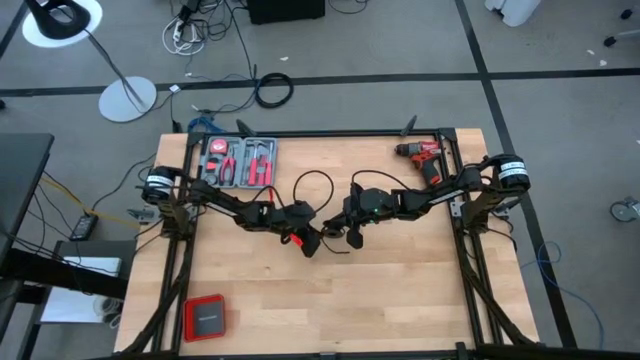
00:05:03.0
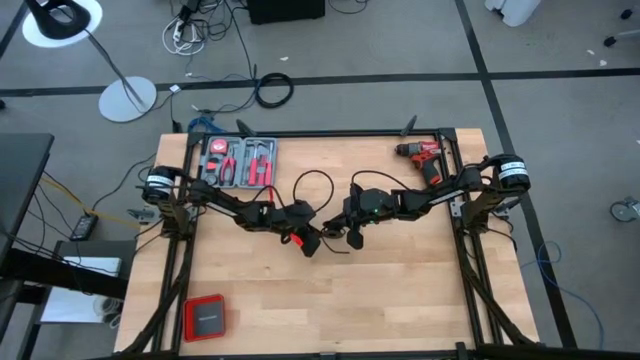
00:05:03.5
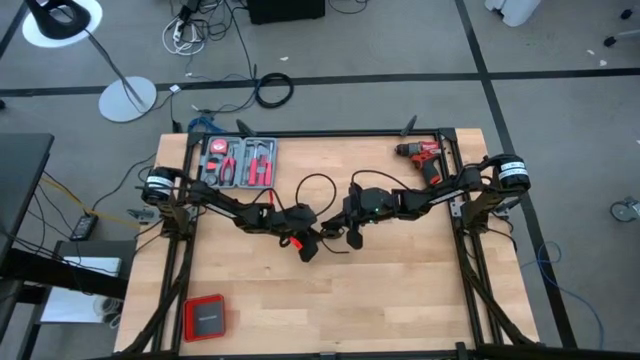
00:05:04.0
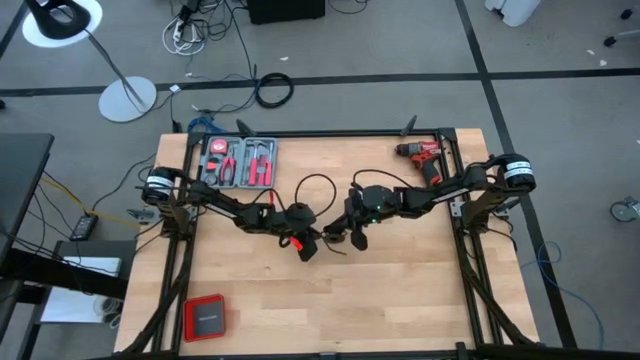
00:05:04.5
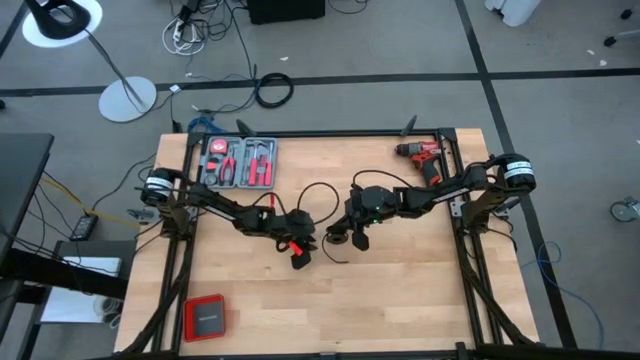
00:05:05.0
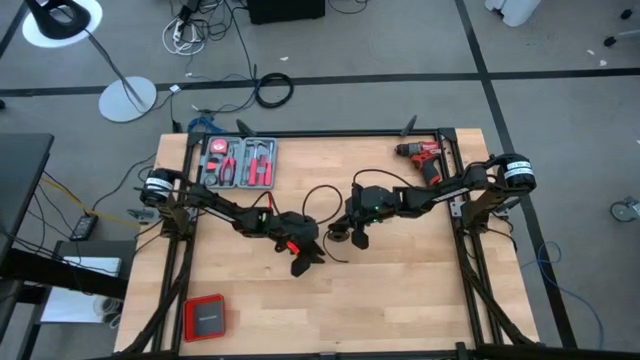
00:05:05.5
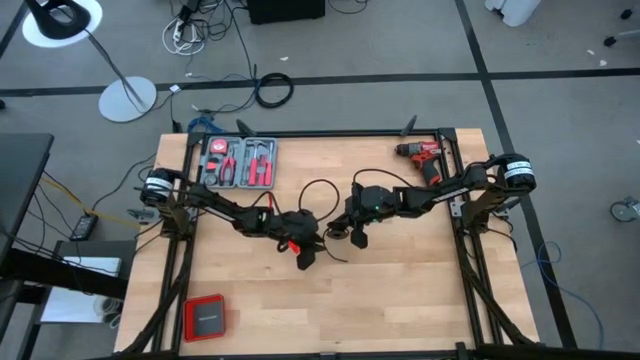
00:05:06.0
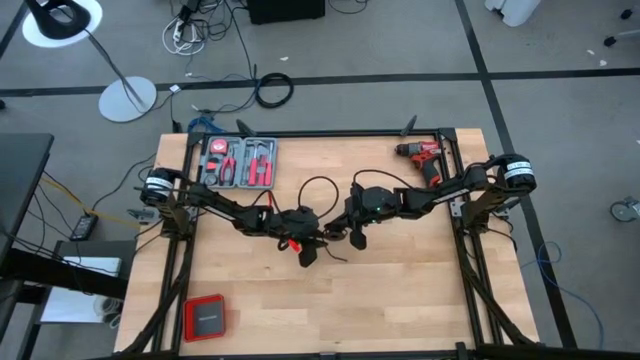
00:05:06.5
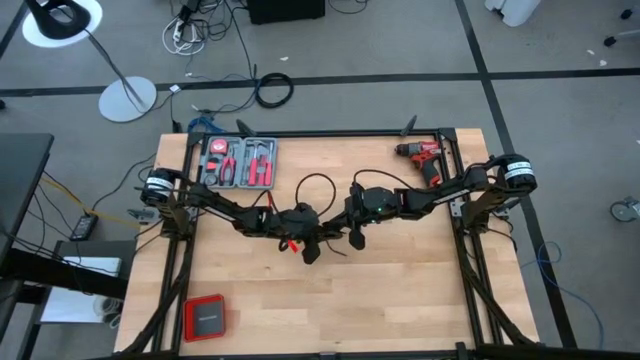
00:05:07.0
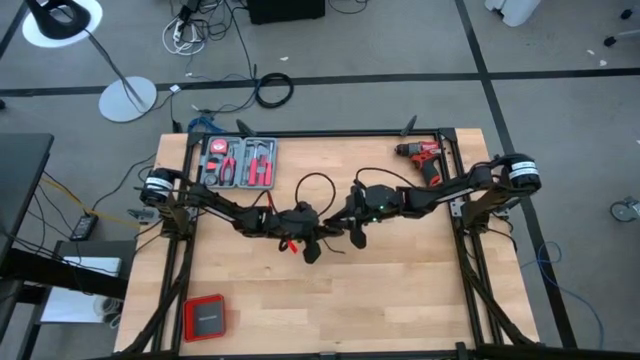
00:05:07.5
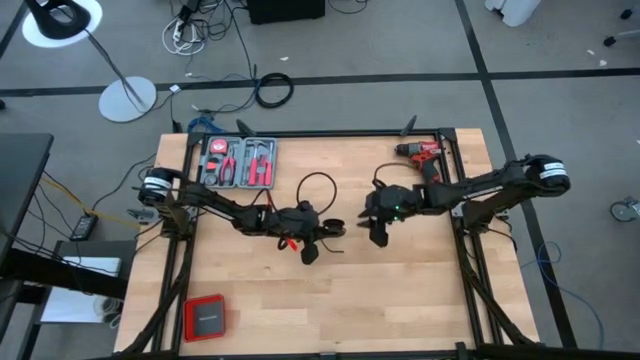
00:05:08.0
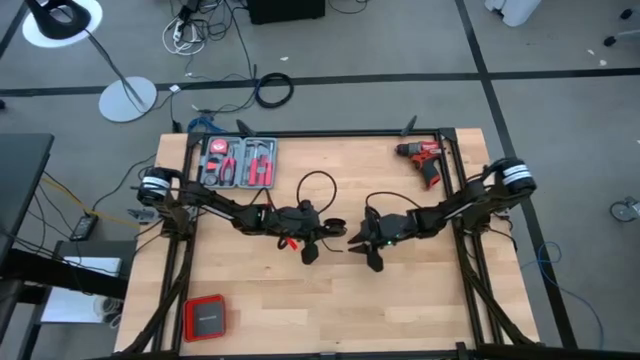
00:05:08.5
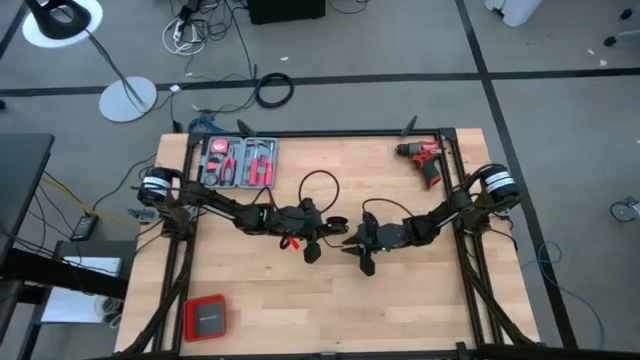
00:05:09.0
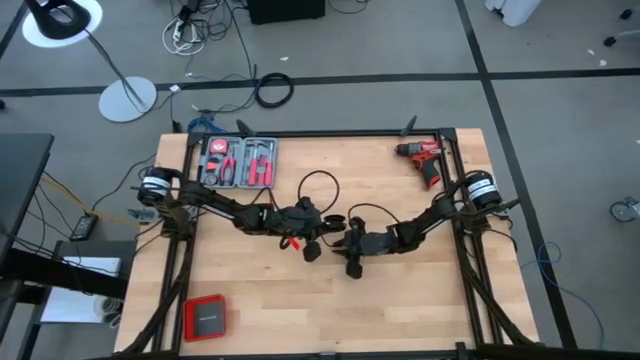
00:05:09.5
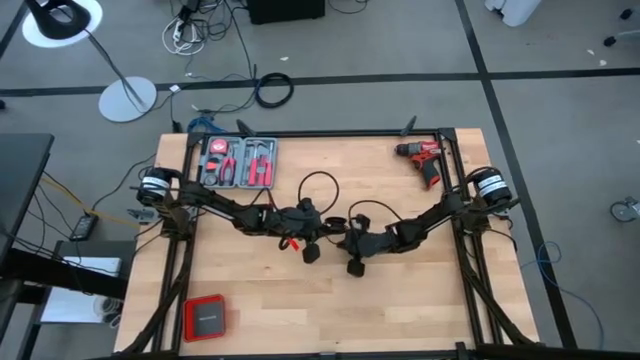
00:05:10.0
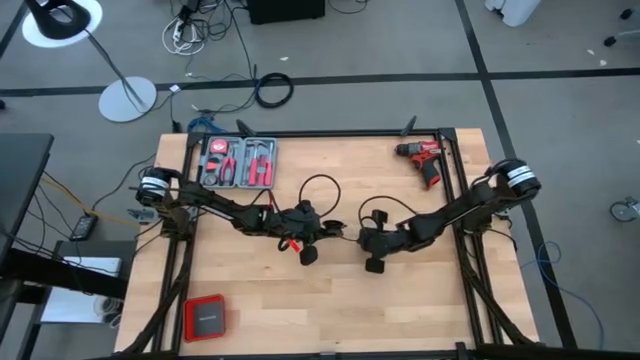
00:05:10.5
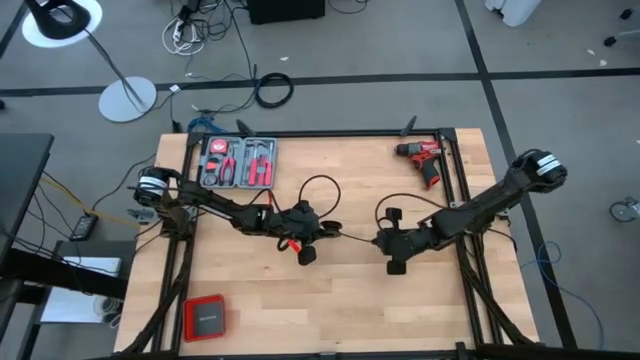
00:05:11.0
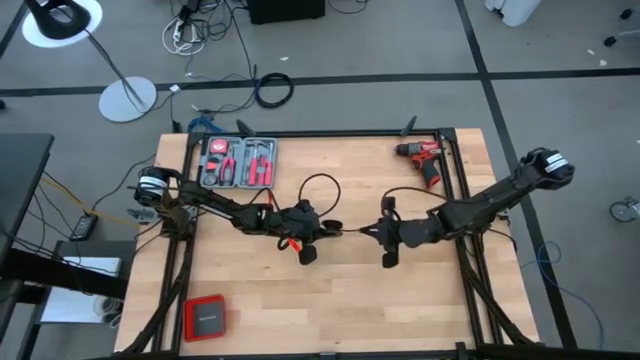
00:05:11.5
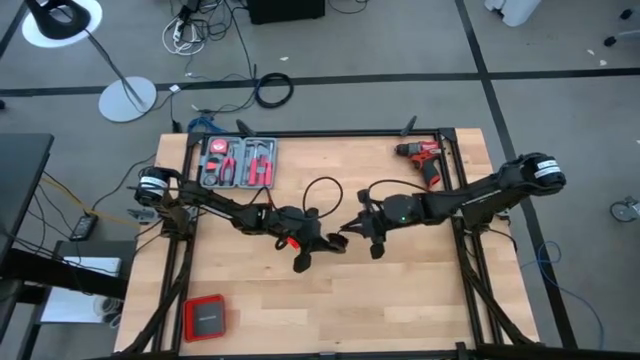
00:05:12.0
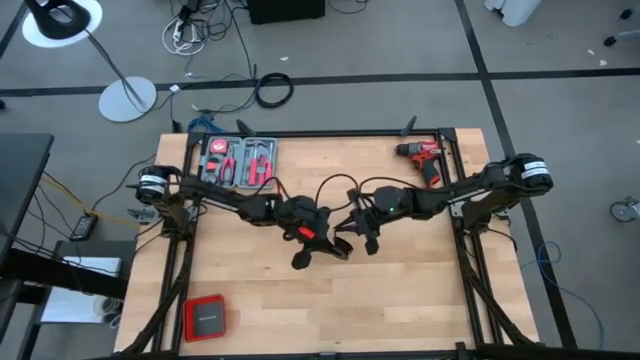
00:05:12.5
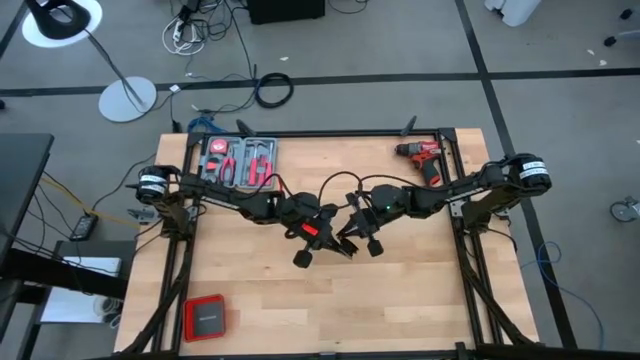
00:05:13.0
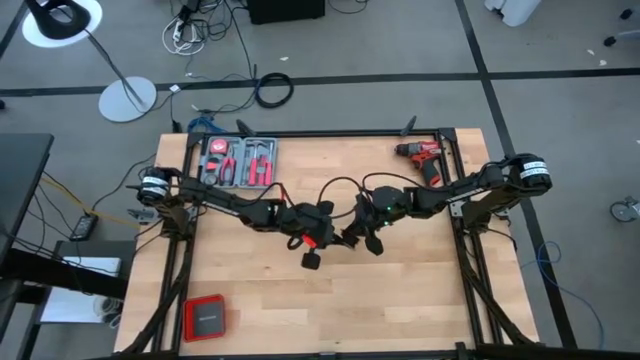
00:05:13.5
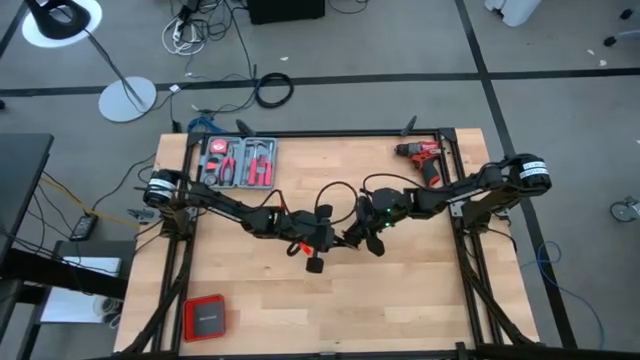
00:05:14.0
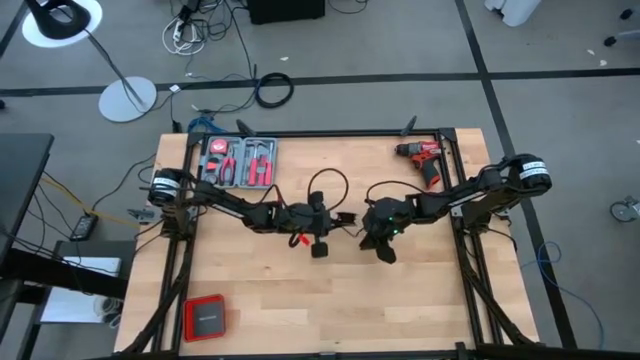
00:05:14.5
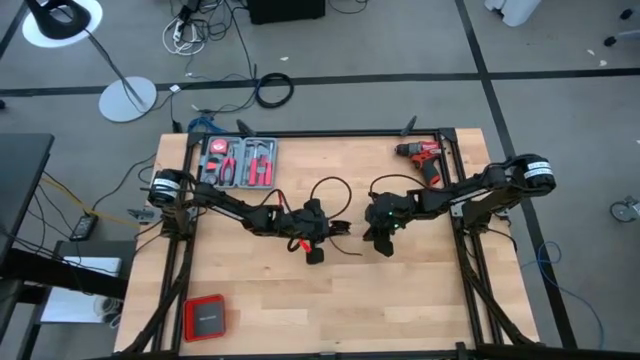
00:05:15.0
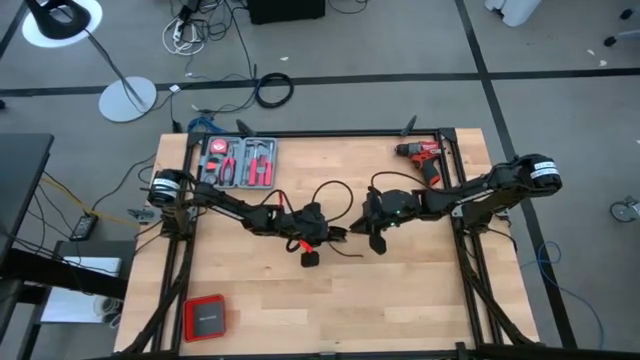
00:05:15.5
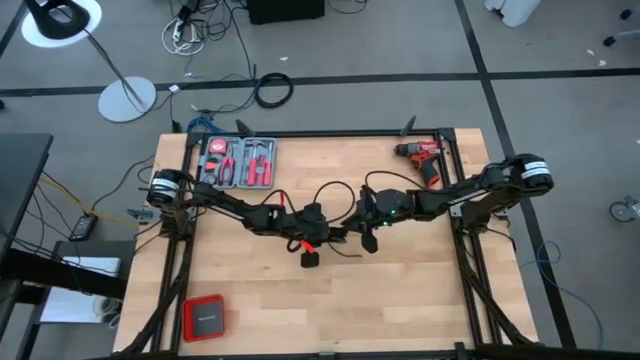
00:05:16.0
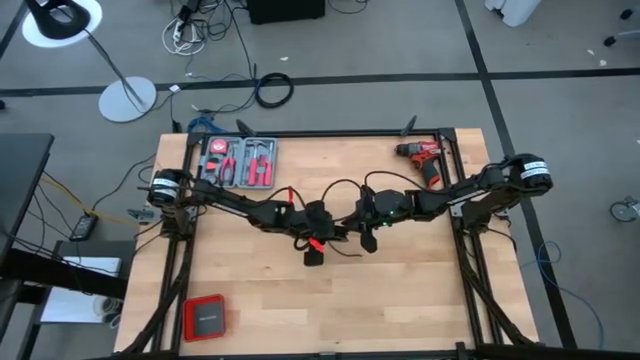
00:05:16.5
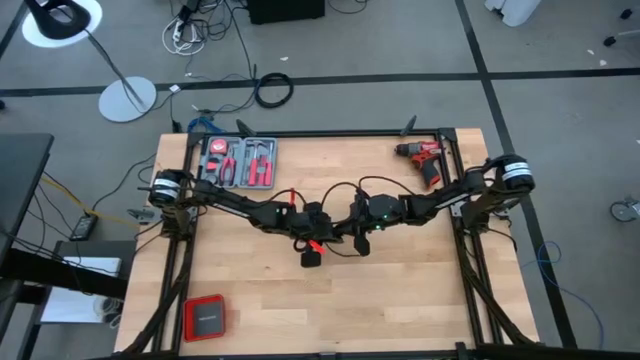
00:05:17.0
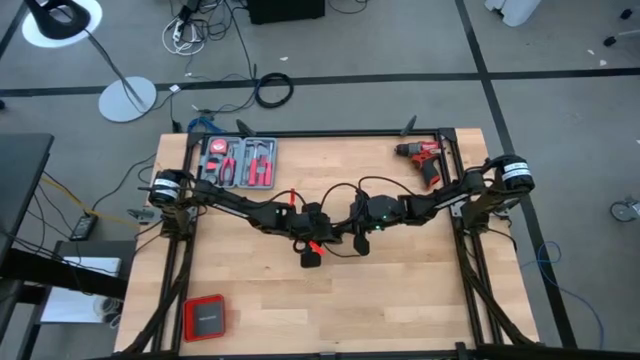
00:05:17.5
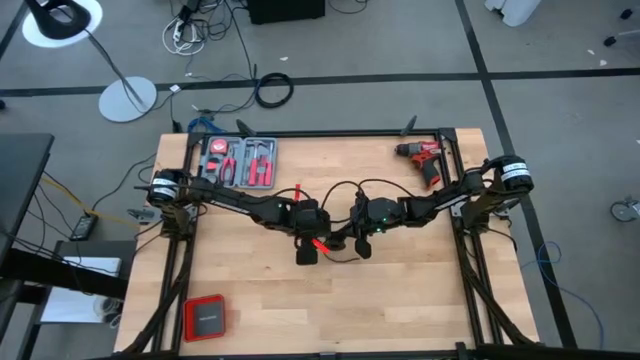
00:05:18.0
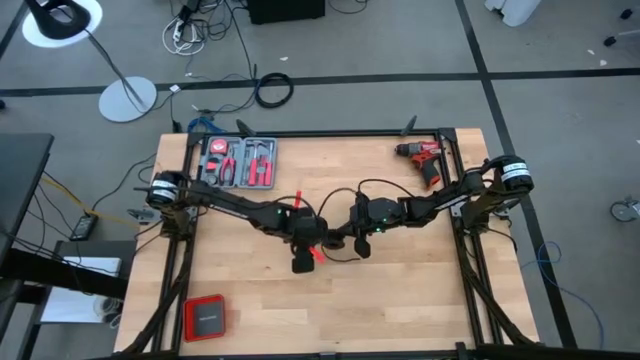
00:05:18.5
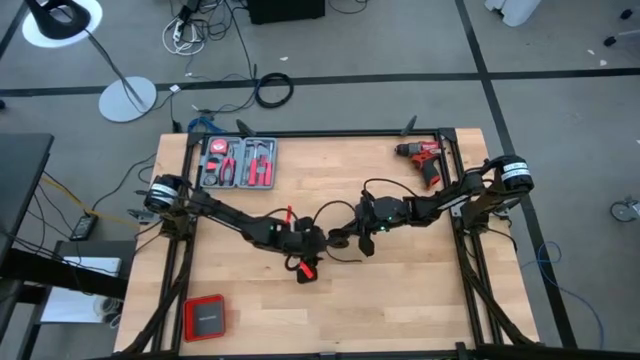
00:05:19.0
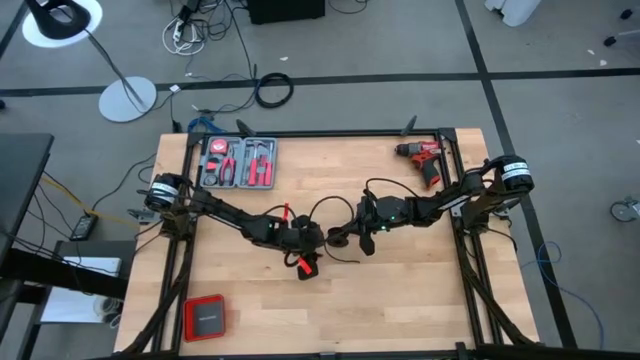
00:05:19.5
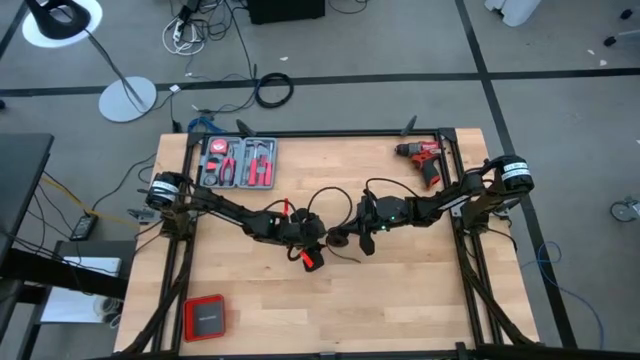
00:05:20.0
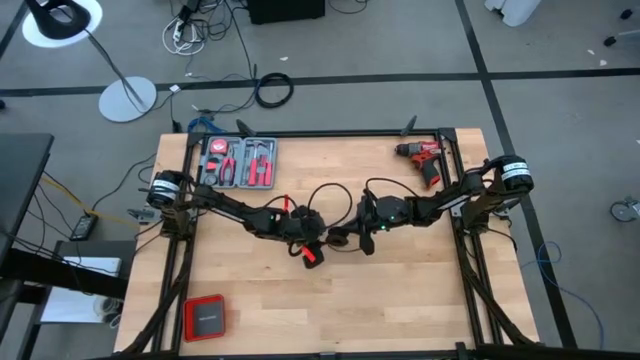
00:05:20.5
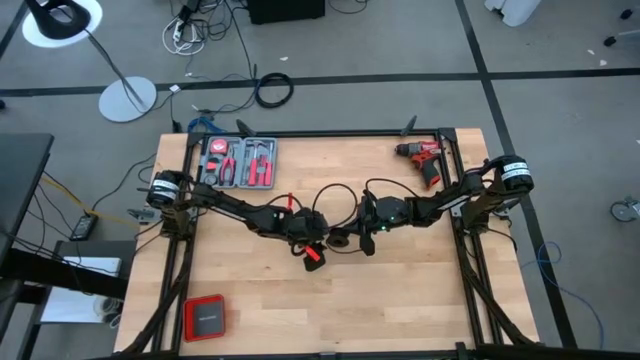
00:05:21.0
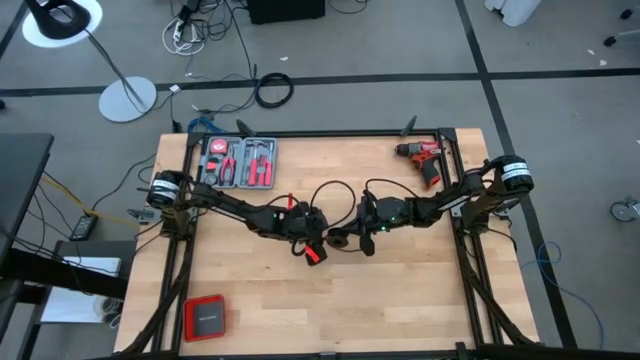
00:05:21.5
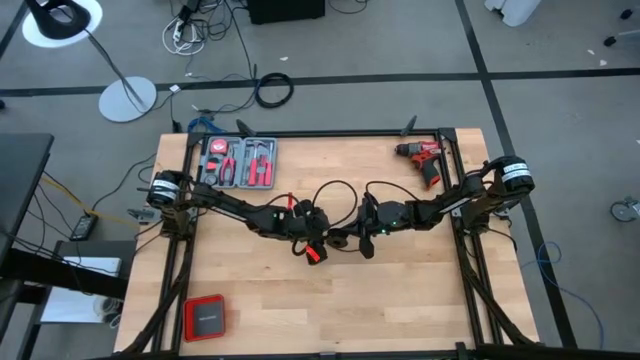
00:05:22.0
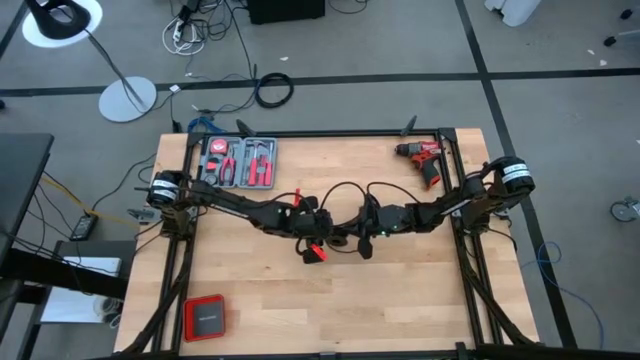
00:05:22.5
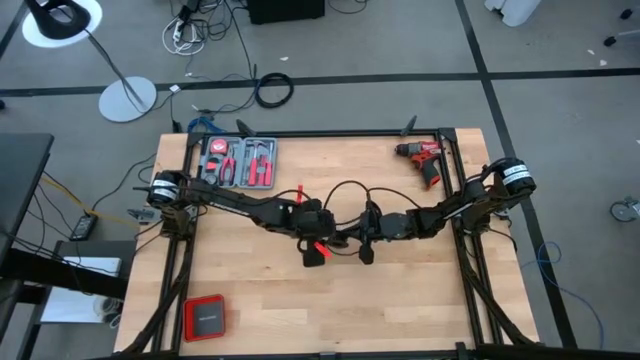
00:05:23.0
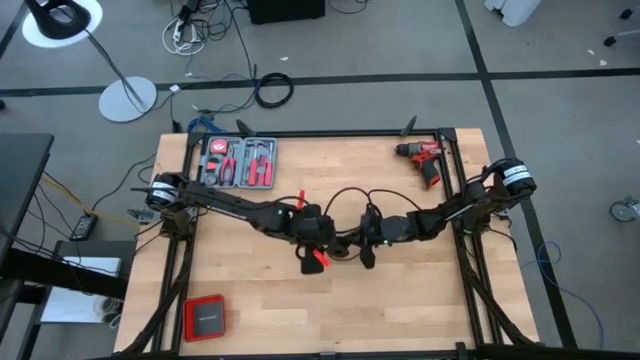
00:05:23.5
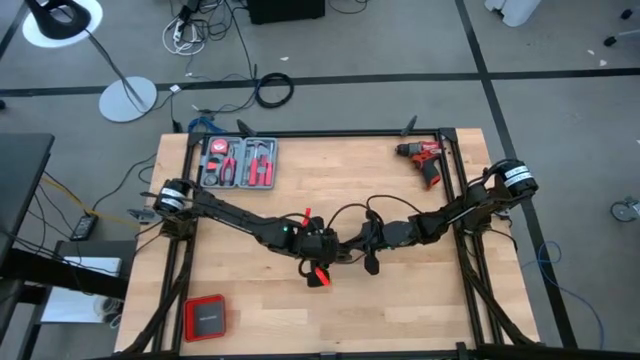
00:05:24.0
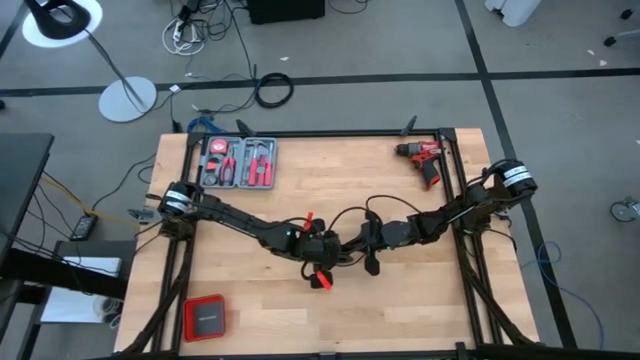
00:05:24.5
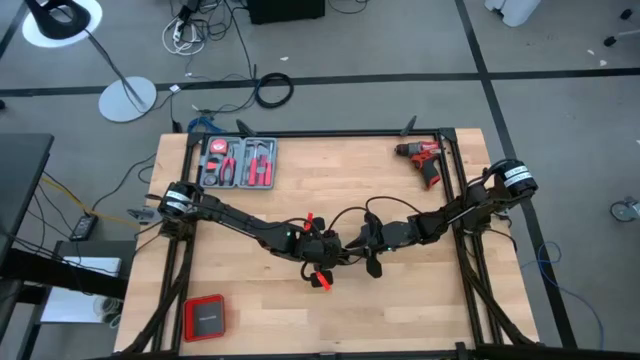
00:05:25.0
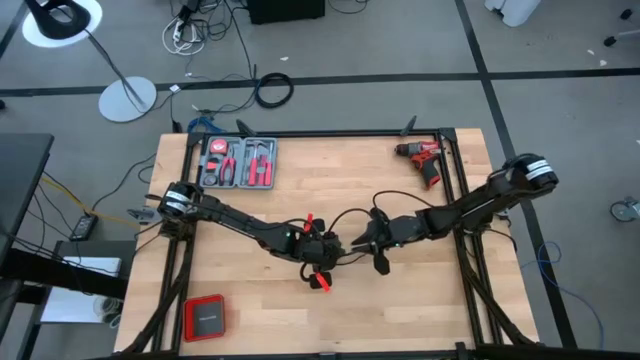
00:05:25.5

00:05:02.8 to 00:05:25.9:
Task: Coil cords
Coil the black wire on the spool
